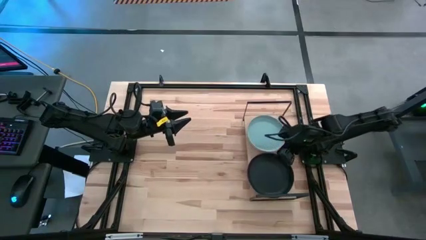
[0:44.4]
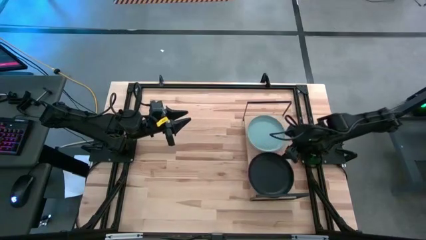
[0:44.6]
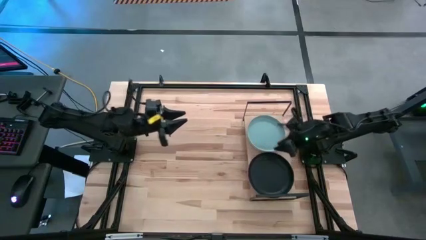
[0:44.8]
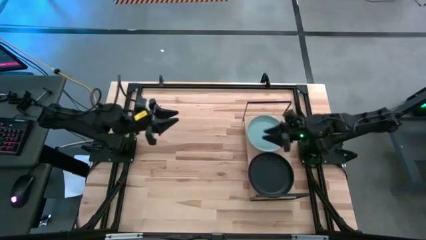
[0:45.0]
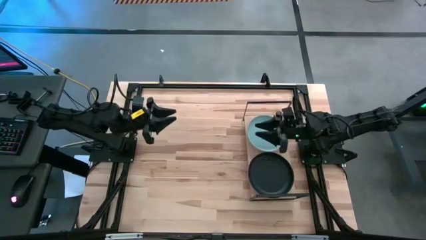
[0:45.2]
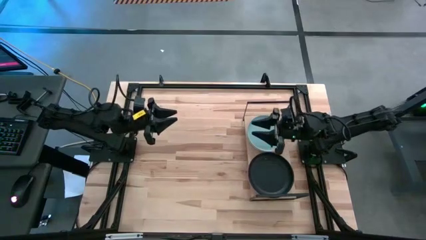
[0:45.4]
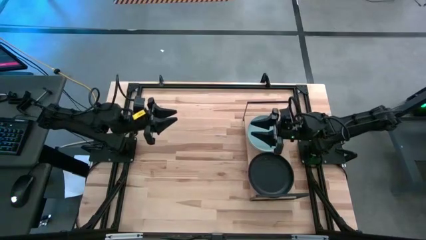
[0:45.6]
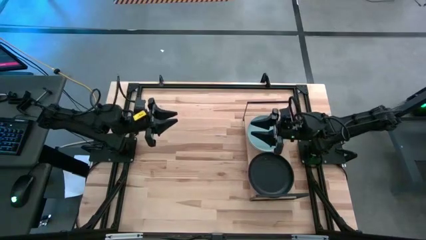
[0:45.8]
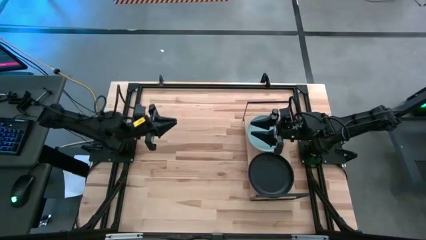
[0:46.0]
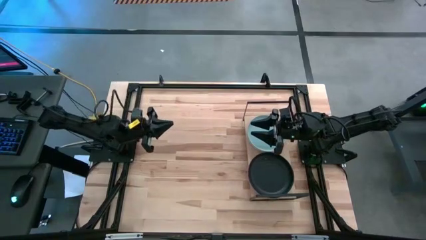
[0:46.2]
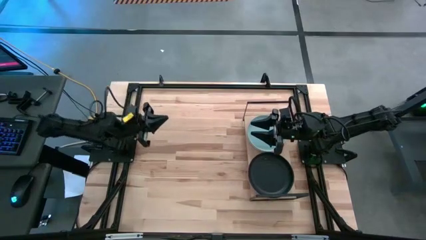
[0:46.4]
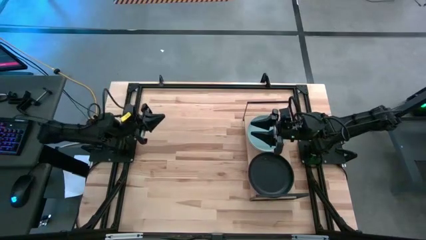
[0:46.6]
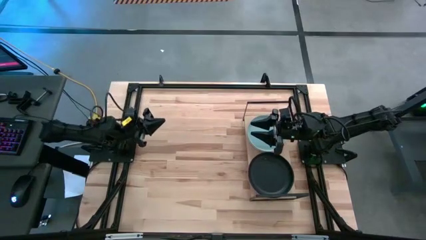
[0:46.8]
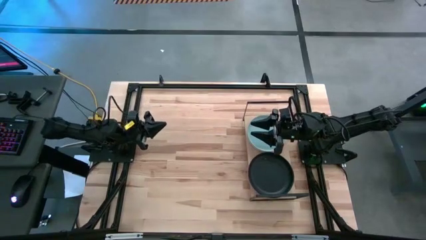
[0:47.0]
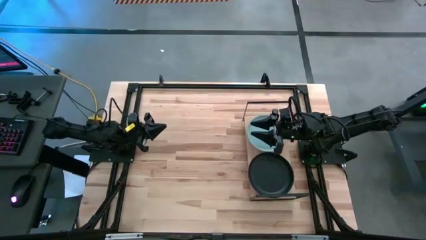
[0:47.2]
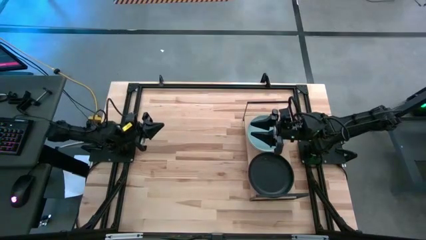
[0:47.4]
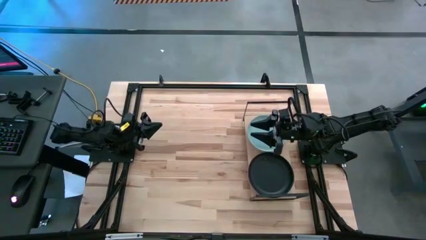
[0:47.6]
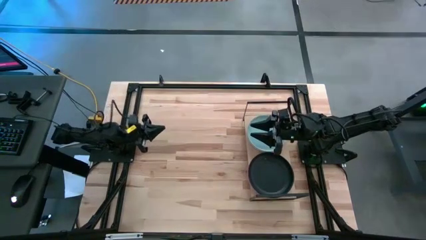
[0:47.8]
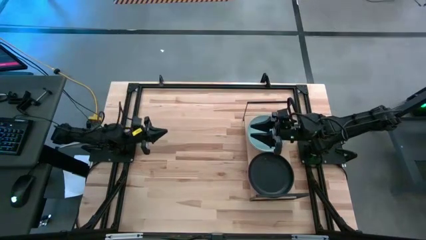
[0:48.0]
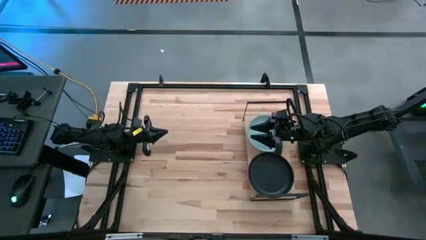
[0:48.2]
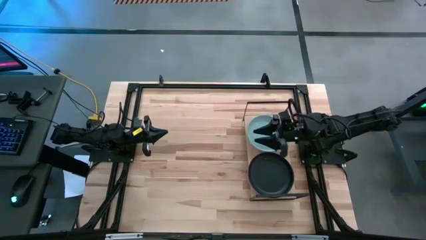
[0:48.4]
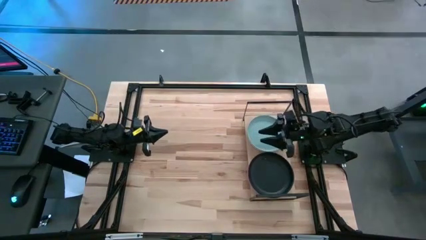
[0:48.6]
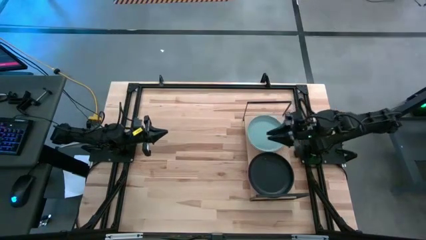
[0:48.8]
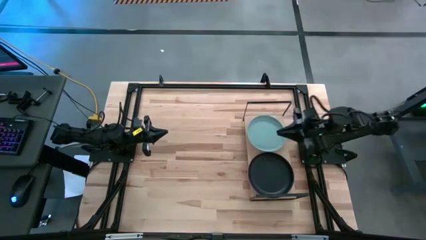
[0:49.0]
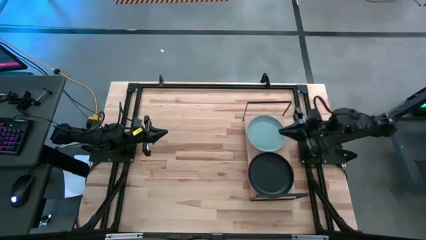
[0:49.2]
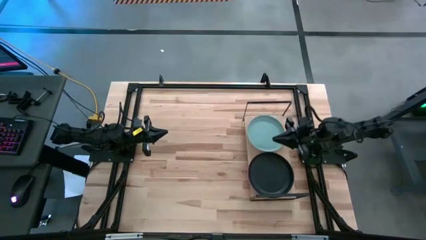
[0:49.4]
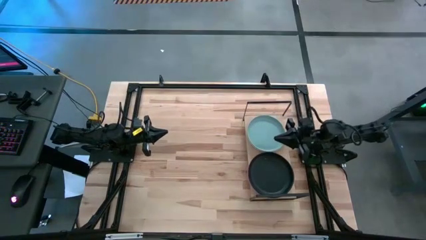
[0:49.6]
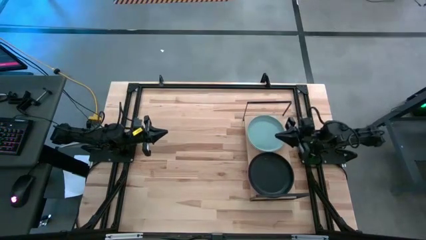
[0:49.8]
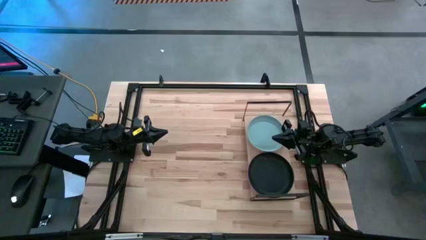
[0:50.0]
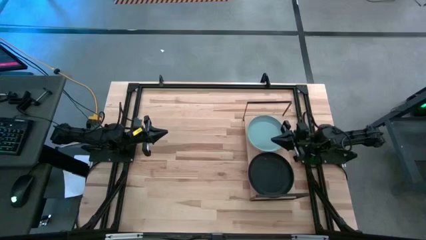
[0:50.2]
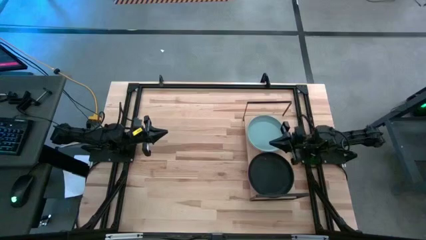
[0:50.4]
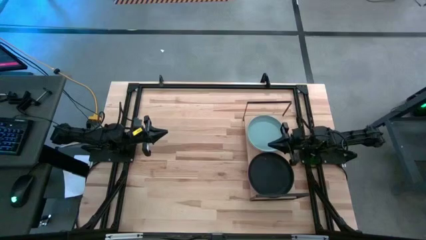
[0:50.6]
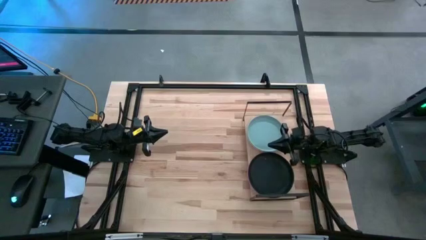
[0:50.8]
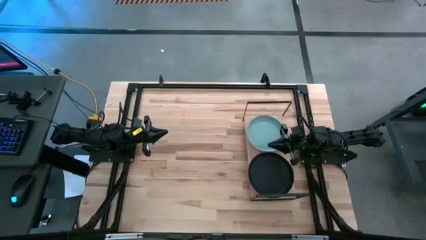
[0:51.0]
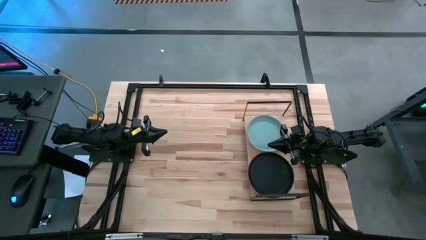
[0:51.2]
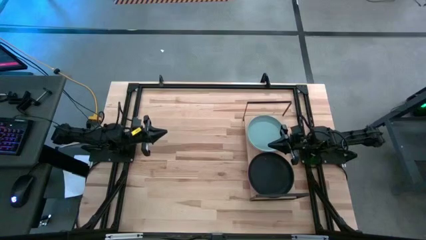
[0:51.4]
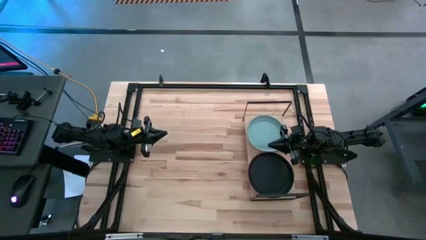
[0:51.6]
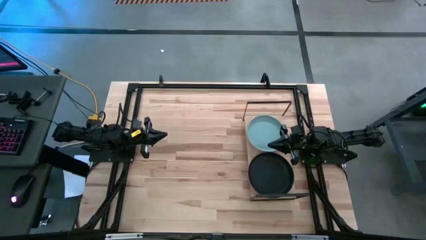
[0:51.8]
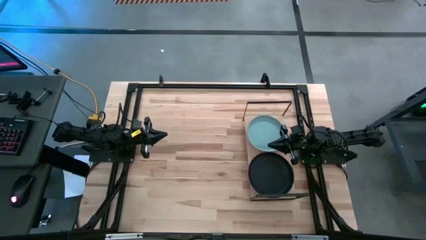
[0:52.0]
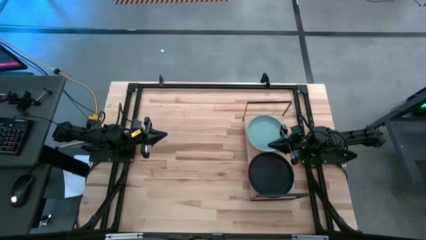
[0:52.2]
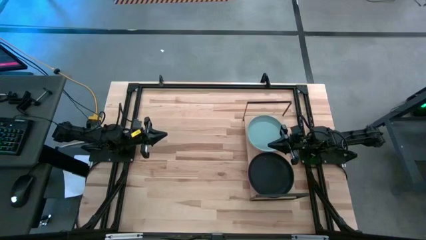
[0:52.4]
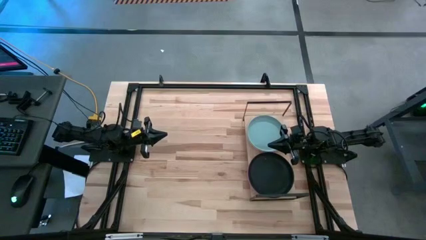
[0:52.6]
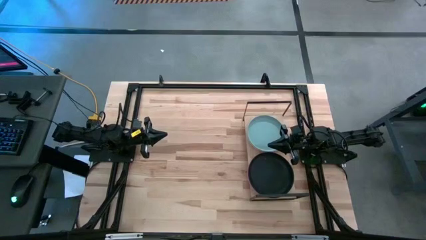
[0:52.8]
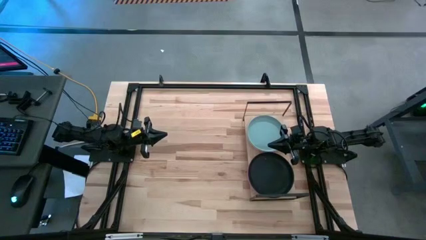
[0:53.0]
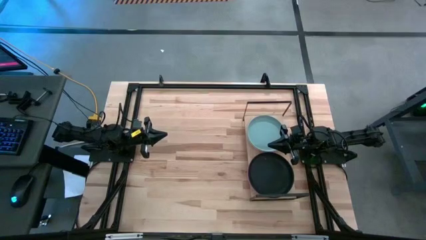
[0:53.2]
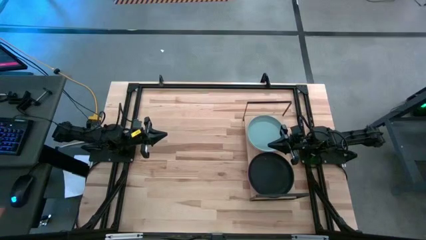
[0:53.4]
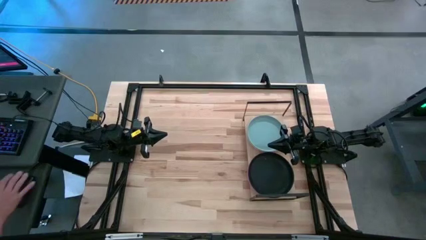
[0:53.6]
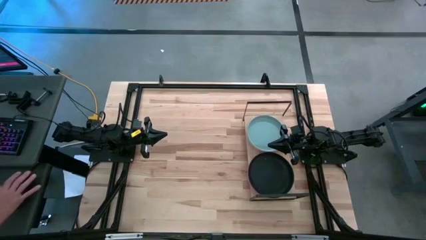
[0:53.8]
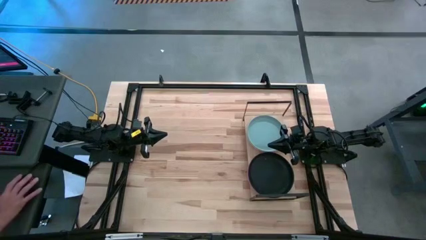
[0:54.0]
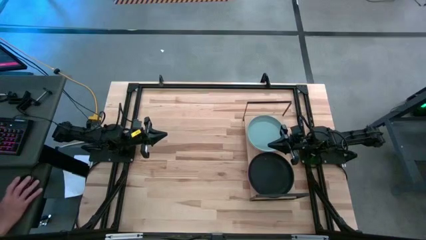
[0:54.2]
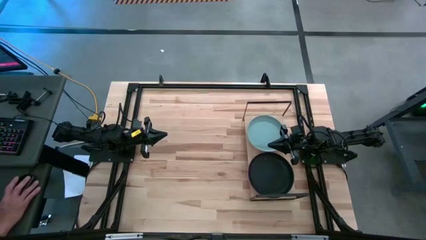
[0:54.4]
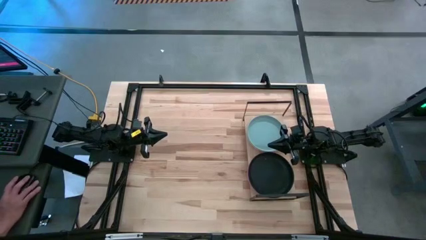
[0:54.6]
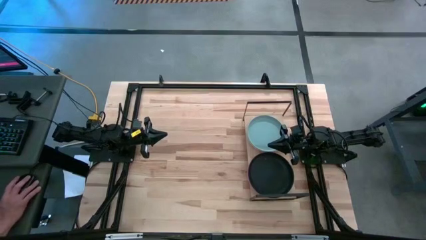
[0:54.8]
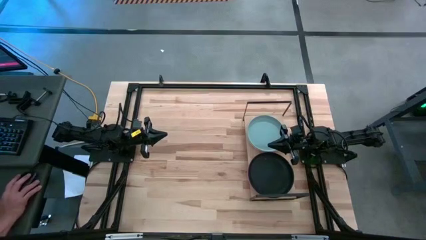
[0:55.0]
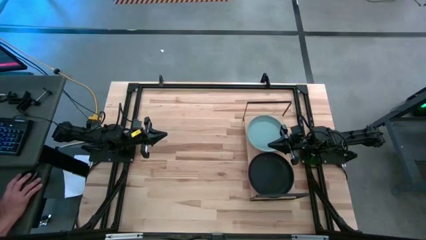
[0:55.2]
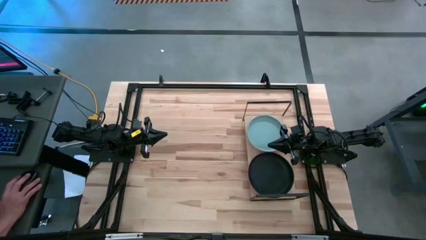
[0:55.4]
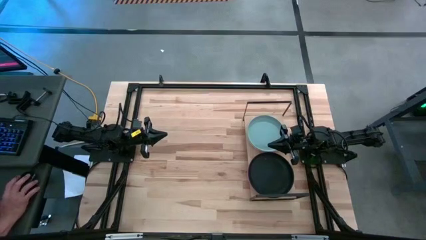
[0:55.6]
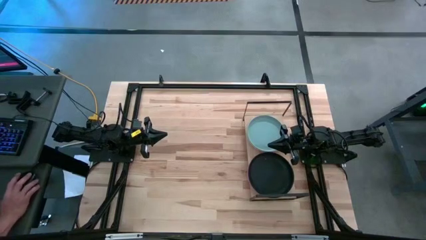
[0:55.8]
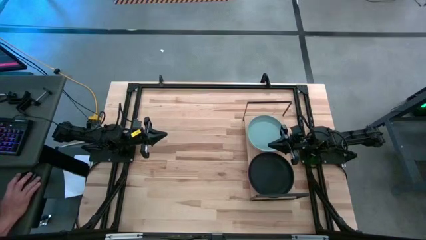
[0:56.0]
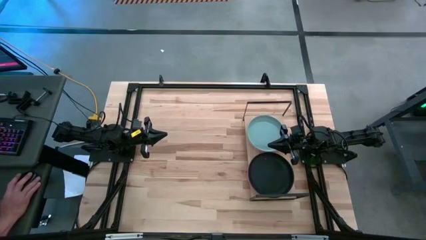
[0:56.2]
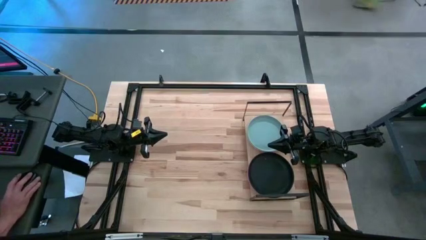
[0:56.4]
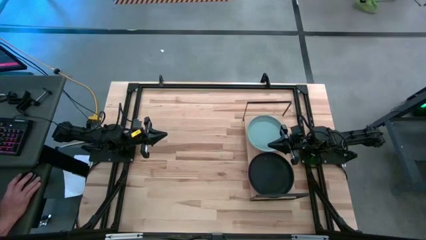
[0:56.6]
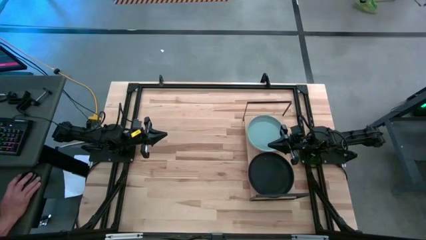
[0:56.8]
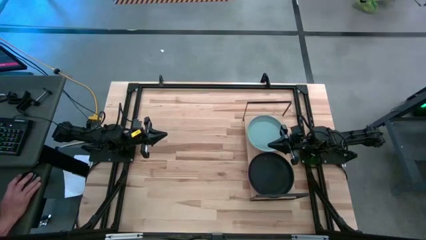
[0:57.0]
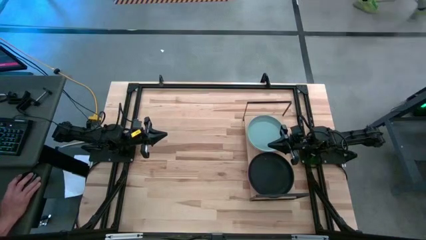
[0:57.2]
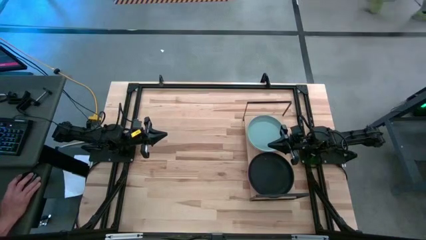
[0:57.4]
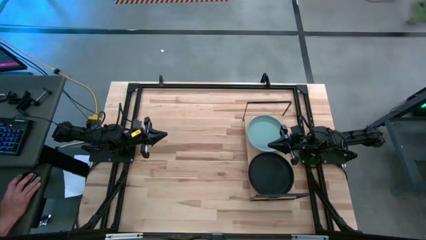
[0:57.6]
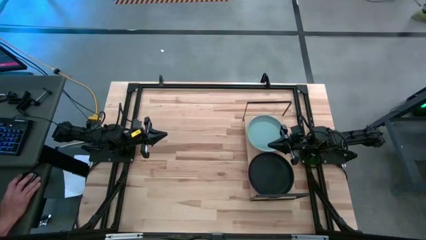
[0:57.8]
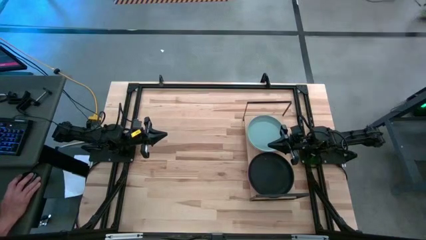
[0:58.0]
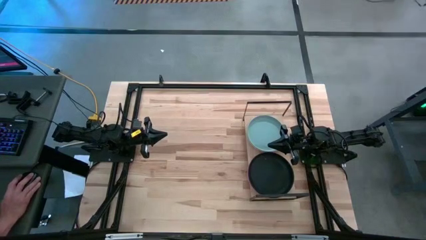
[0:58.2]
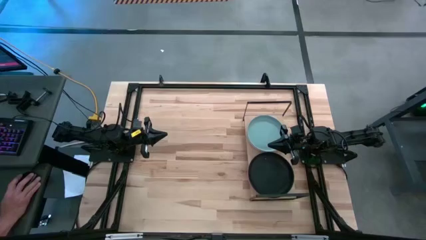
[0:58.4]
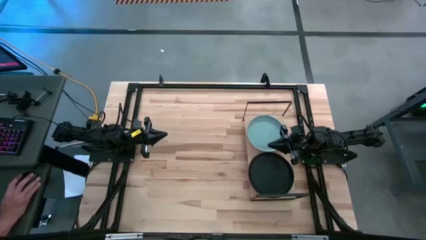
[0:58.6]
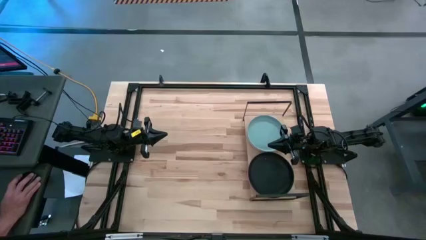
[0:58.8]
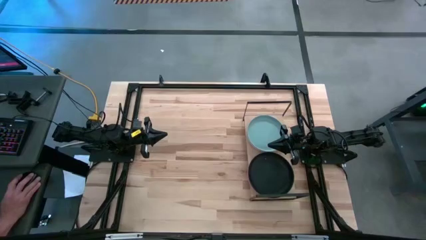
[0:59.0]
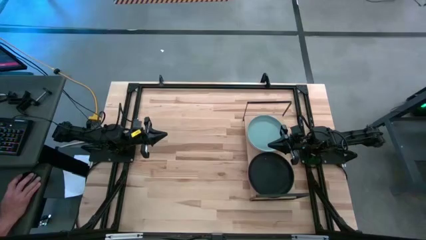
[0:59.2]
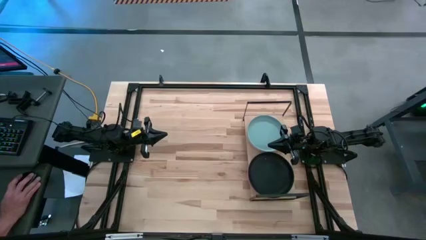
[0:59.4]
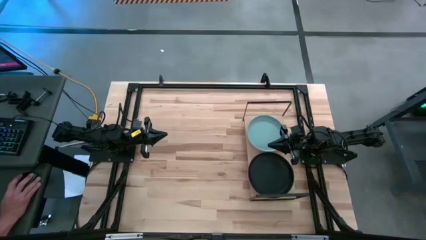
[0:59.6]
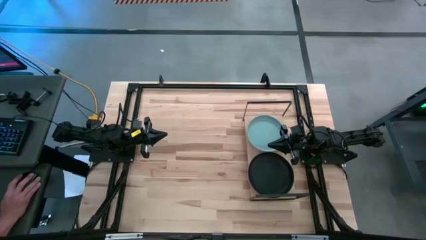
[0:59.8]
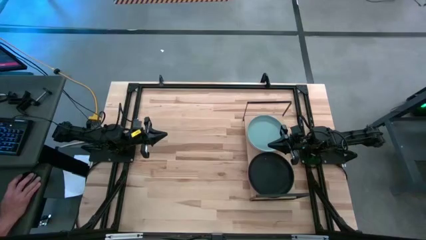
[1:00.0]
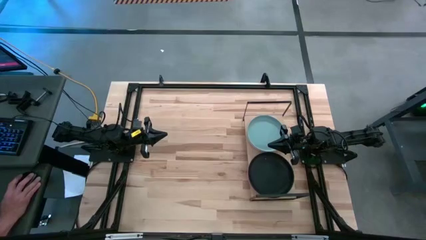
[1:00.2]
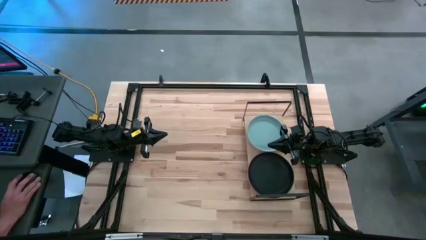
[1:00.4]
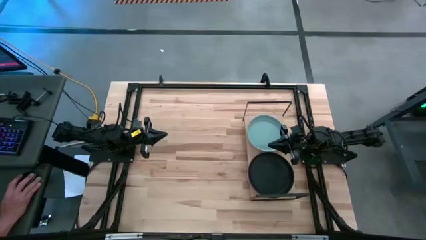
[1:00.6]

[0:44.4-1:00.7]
Task: Place and stack plates onto a shelf
Return to Home Position
